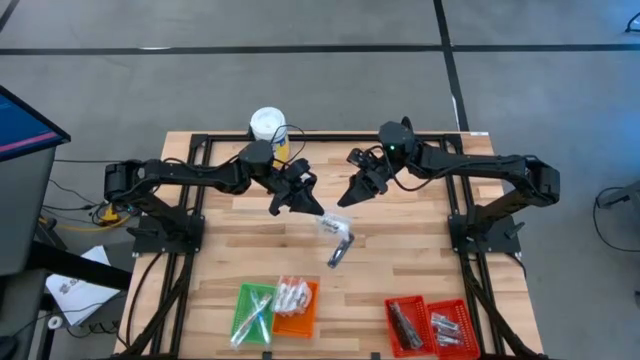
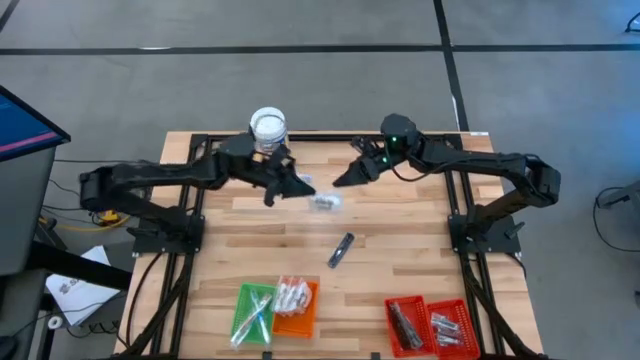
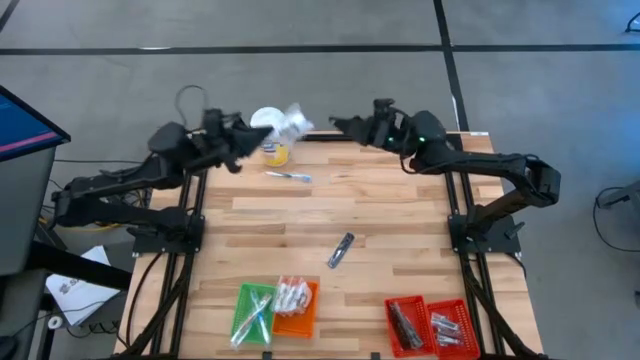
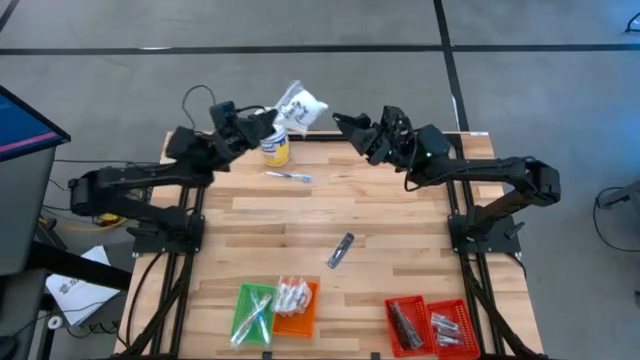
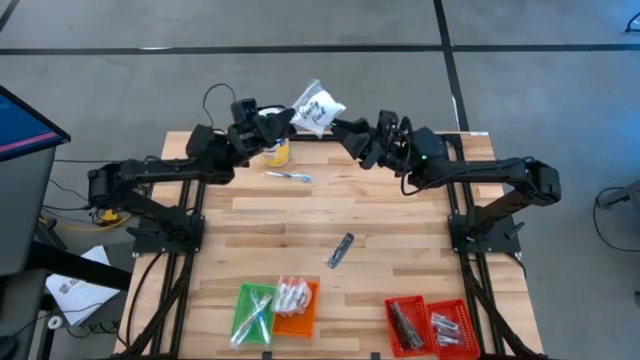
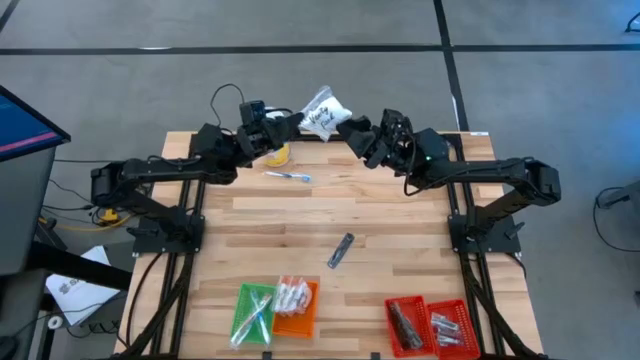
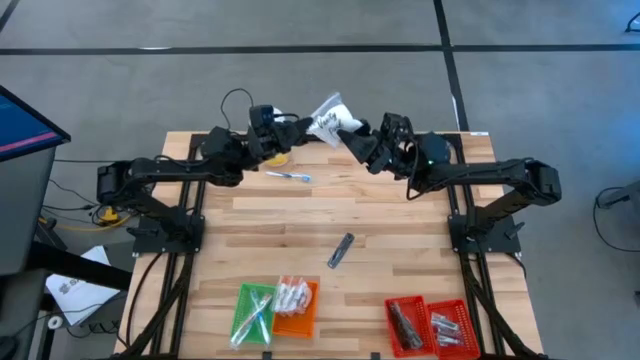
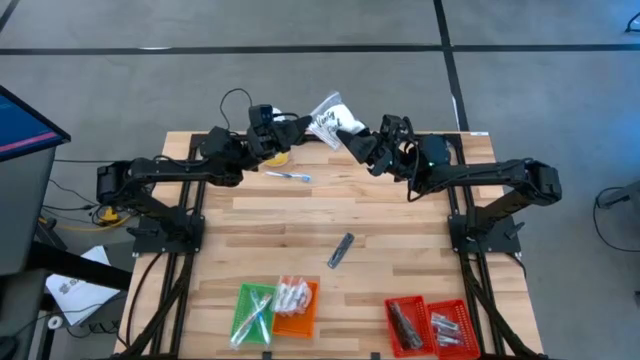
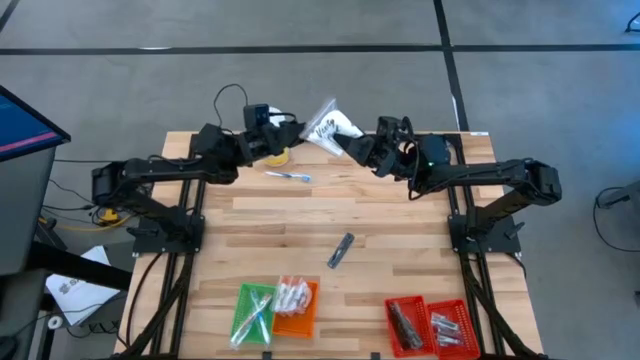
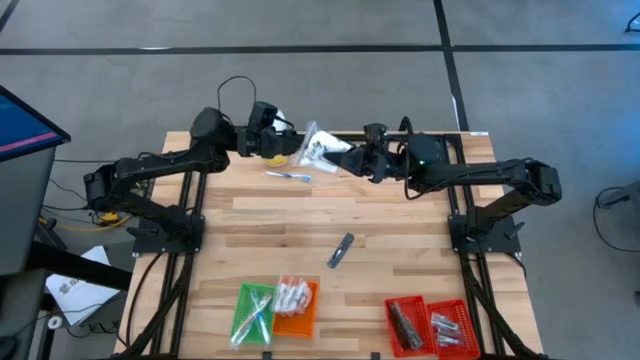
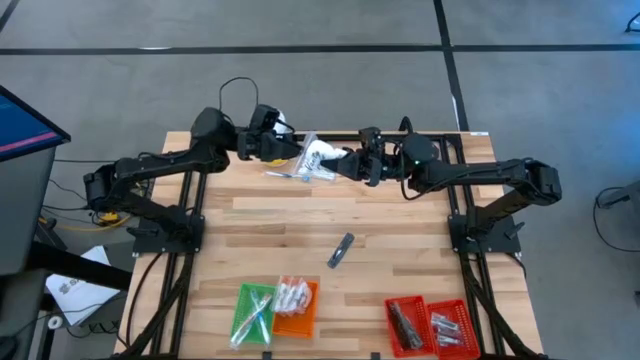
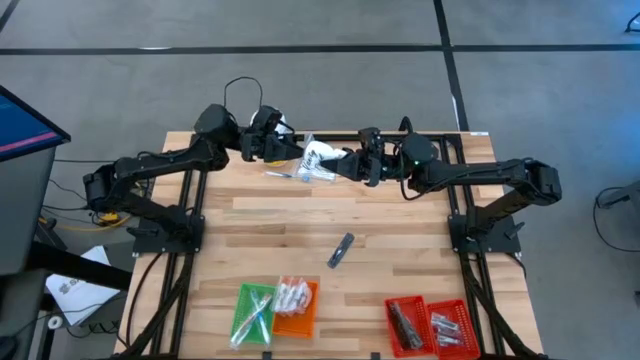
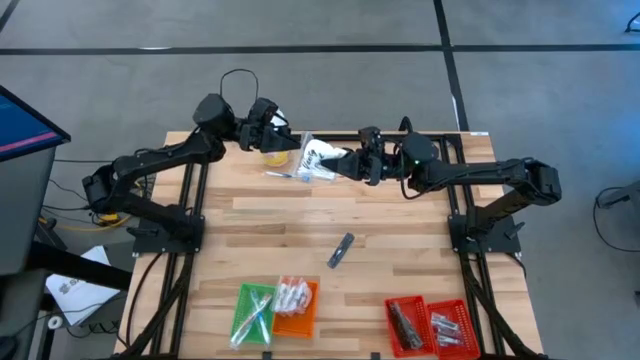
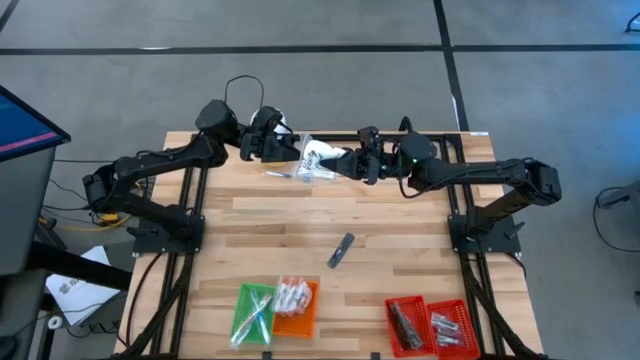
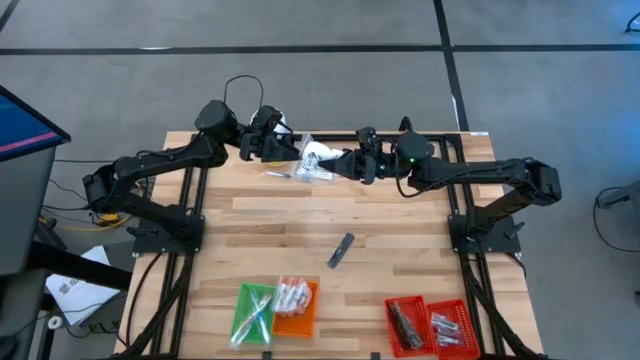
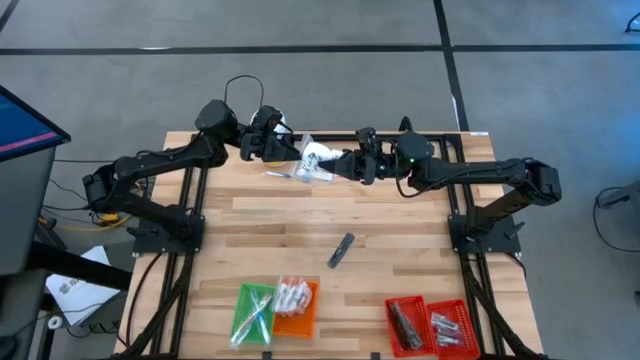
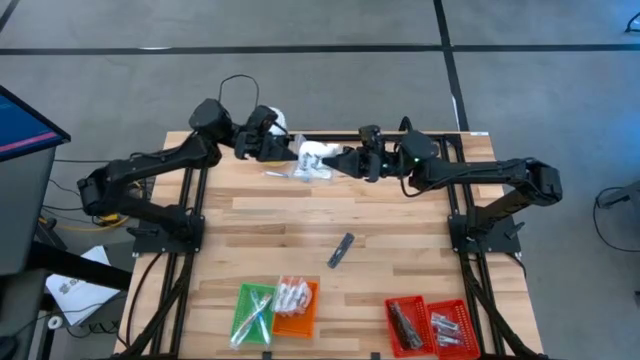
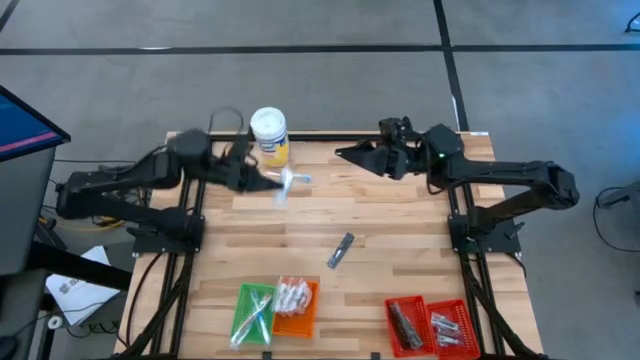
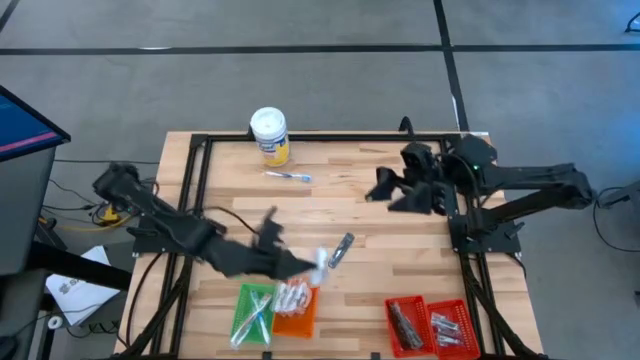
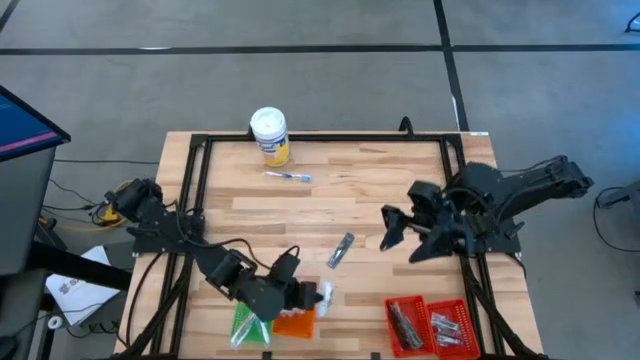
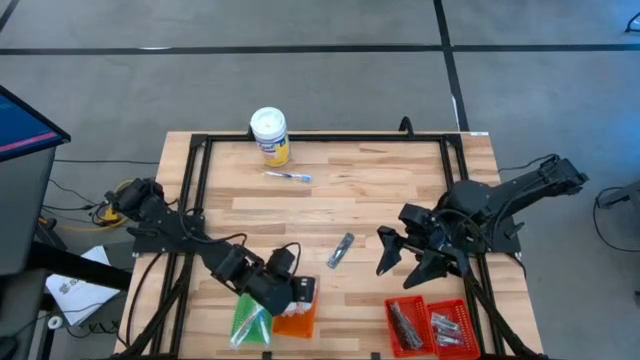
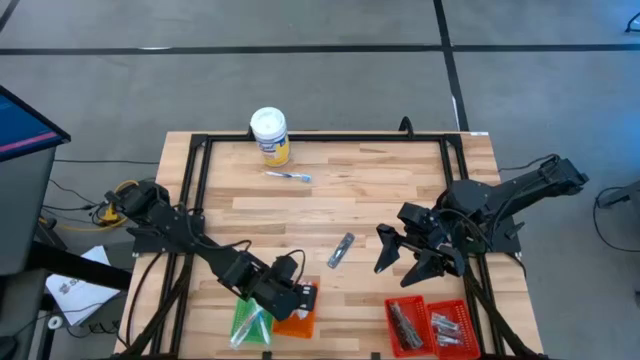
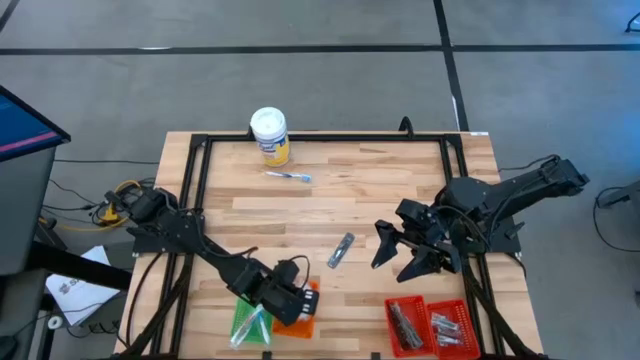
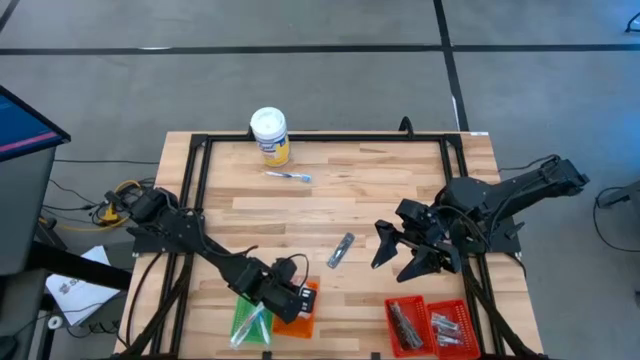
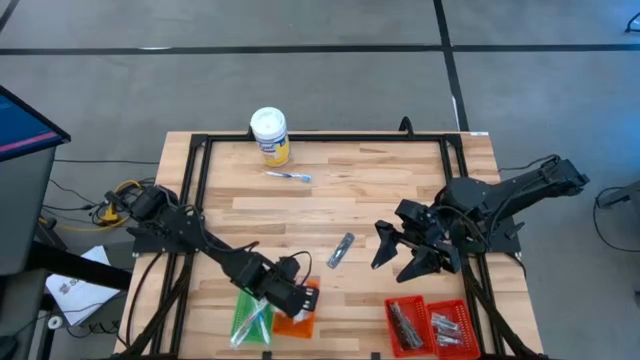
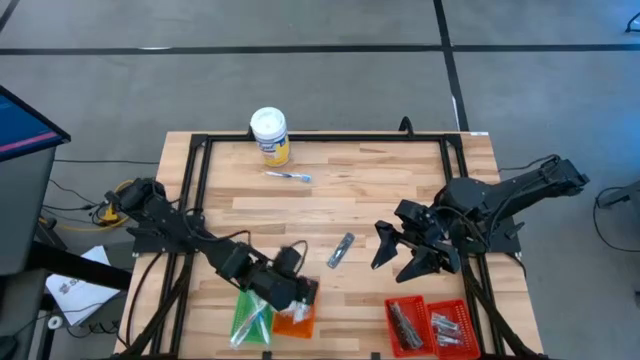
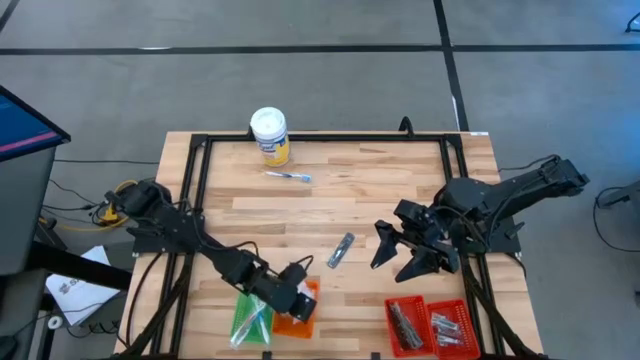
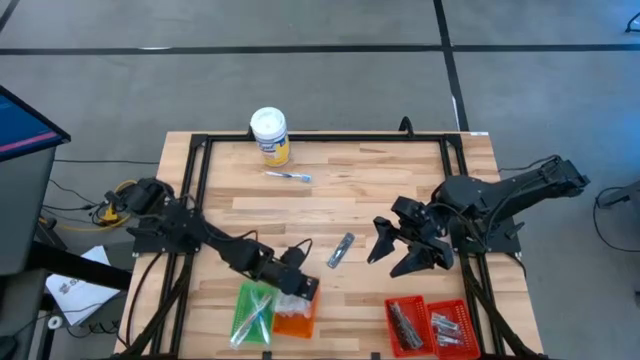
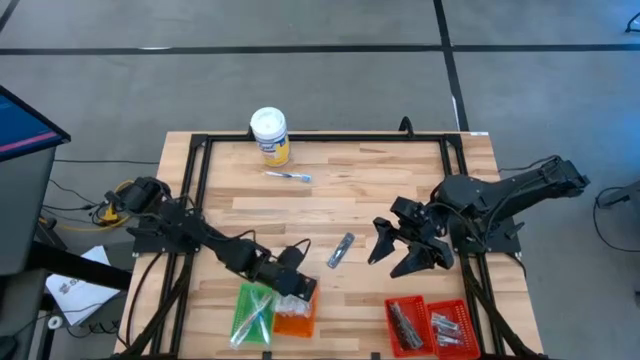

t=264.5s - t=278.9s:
Task: Pick & Place Travel size toiletries
Put the white vanity pack into the orange basket

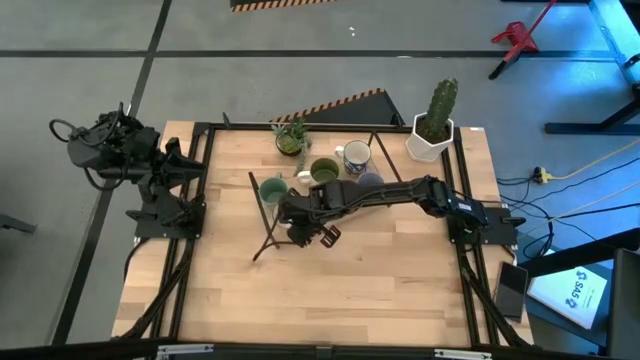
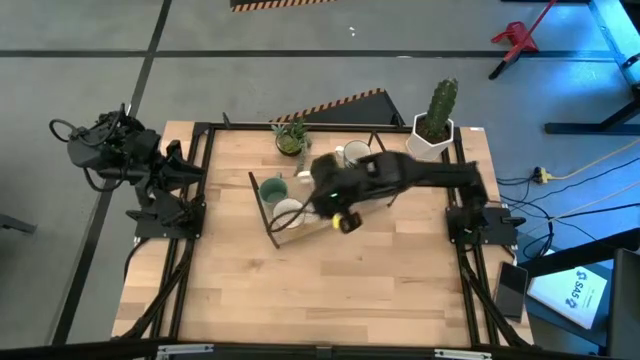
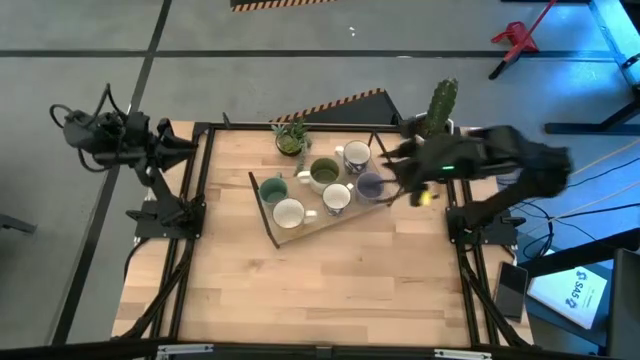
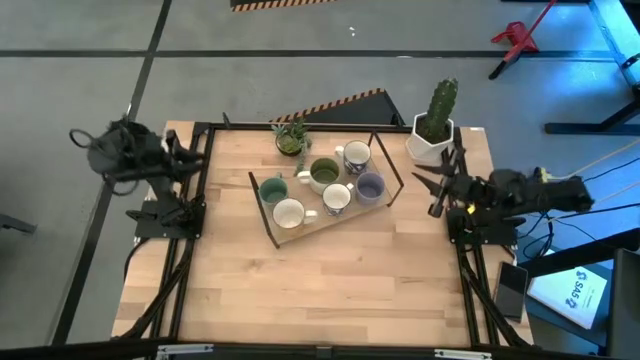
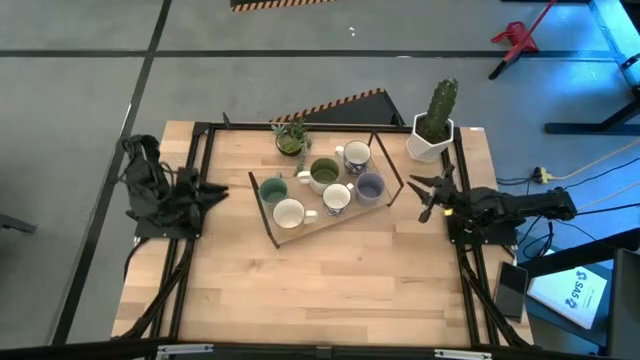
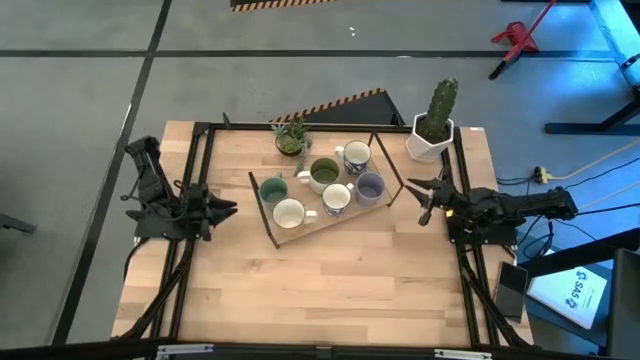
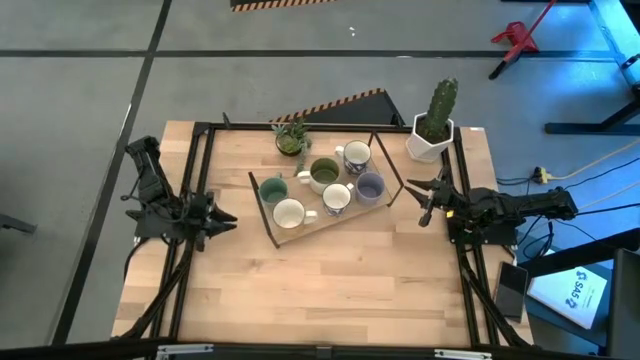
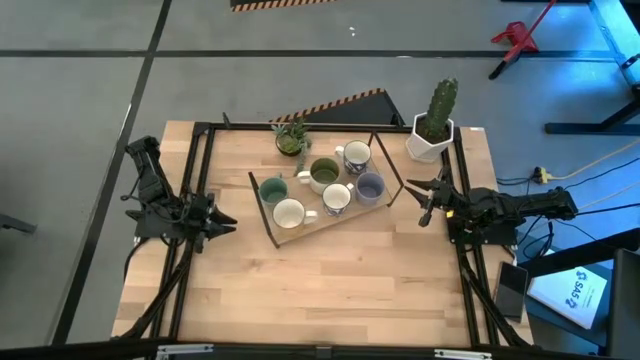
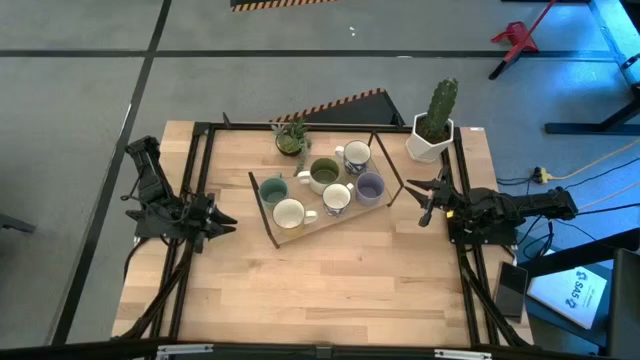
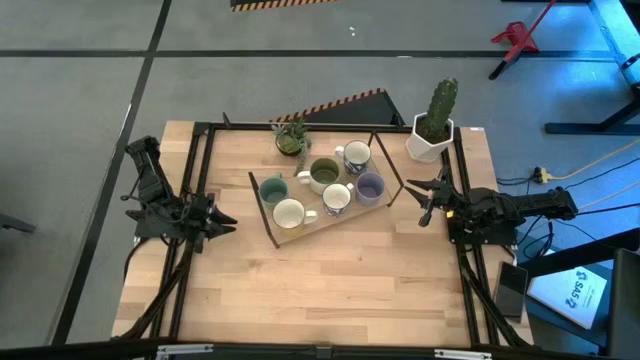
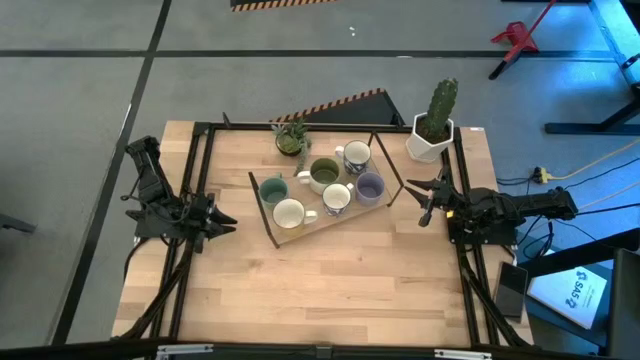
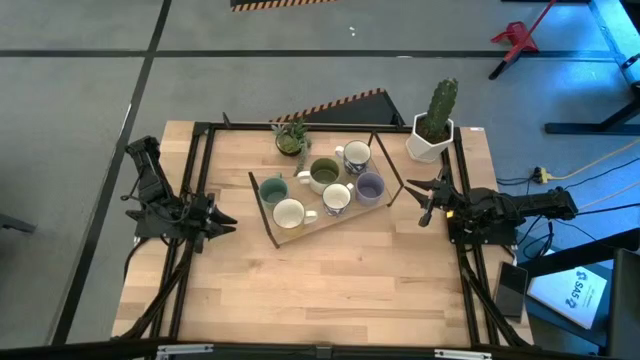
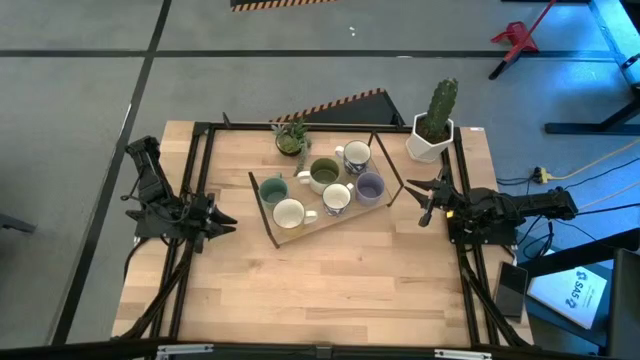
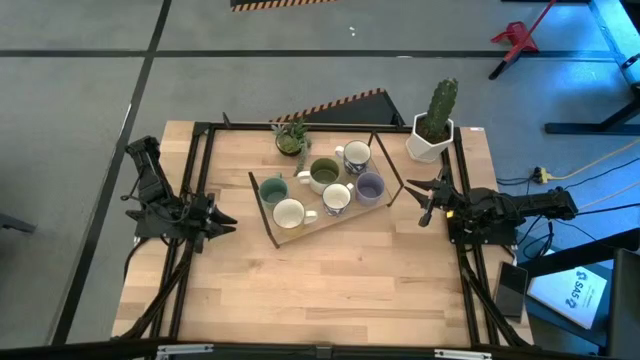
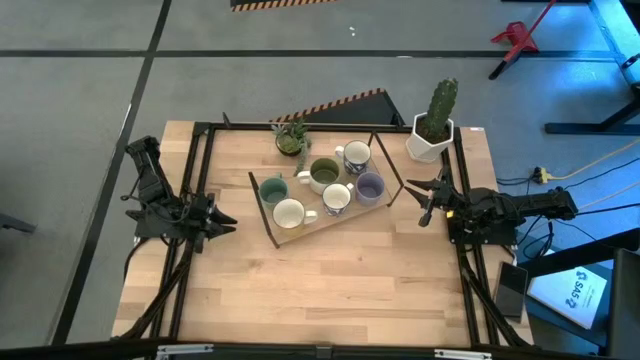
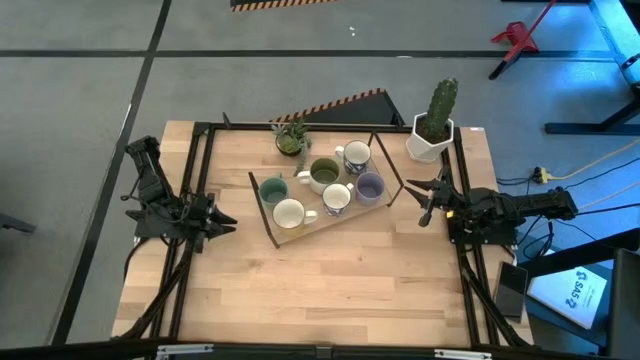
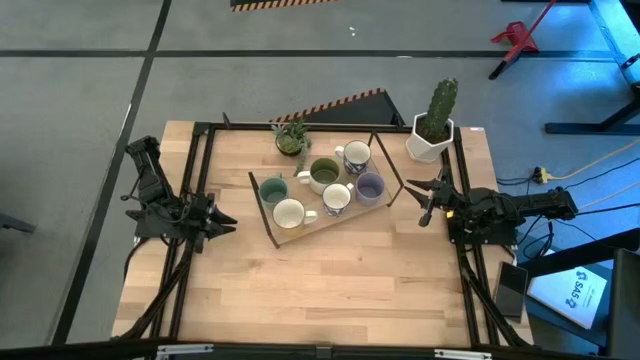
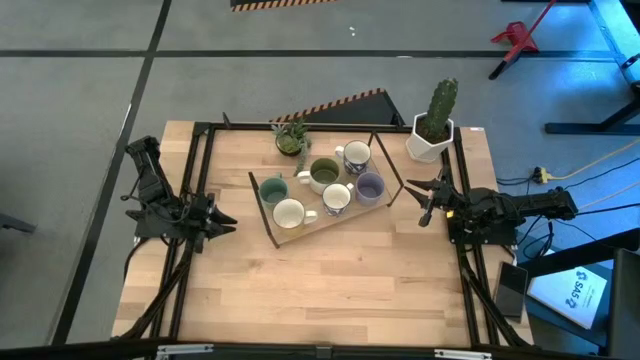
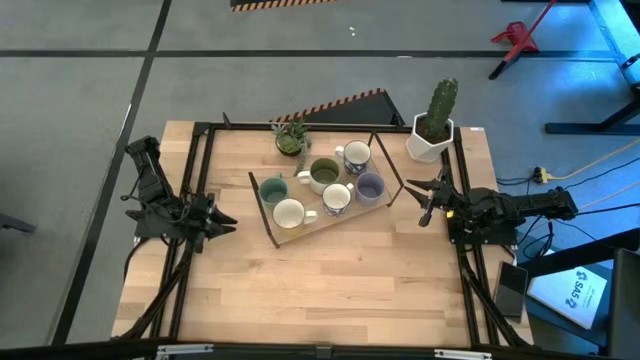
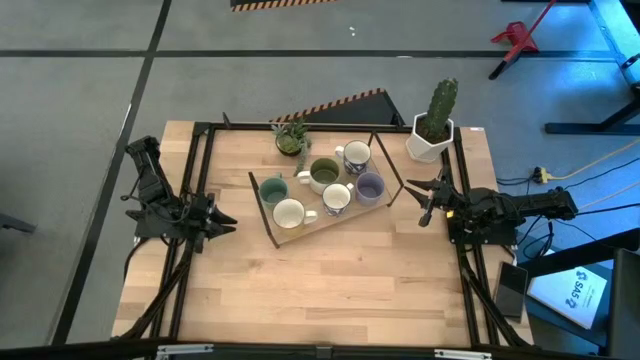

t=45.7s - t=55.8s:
Task: Place coffee mugs
Return to Home Position
